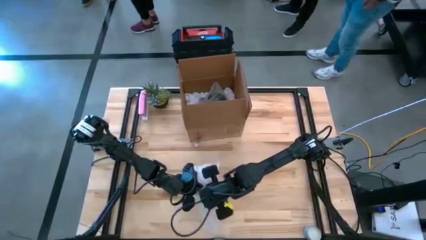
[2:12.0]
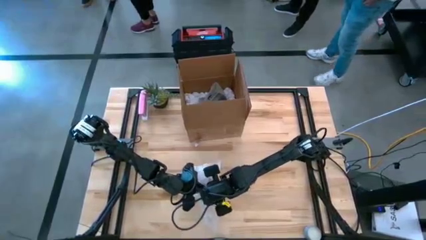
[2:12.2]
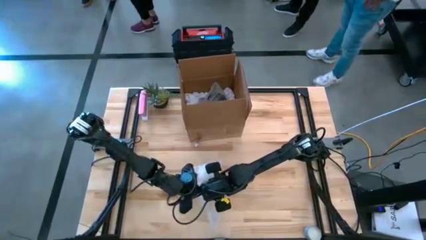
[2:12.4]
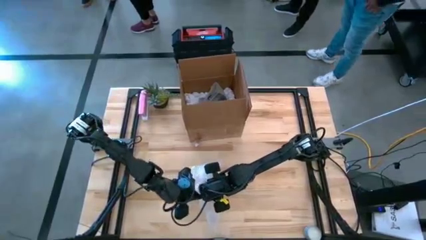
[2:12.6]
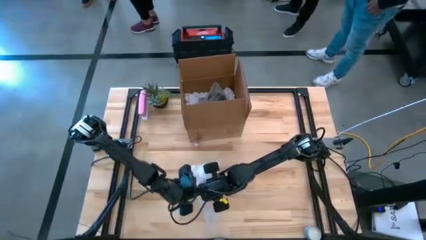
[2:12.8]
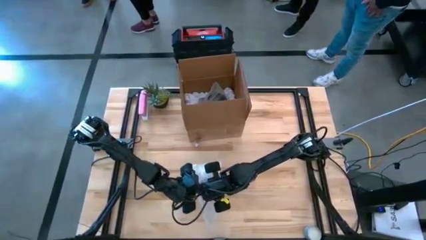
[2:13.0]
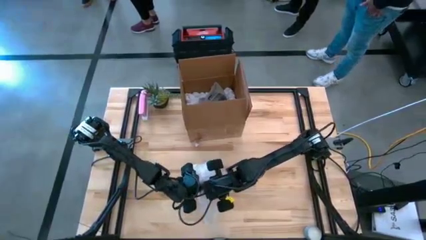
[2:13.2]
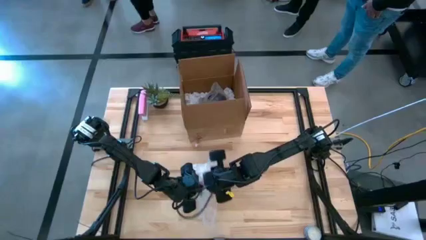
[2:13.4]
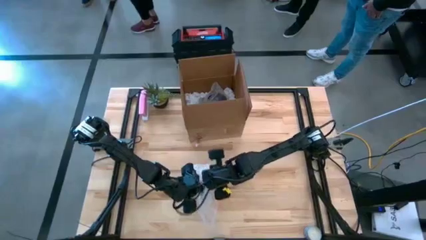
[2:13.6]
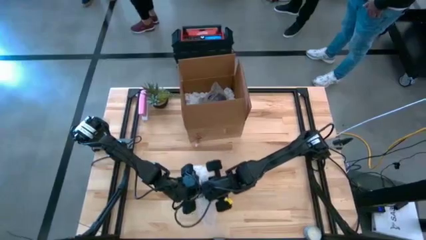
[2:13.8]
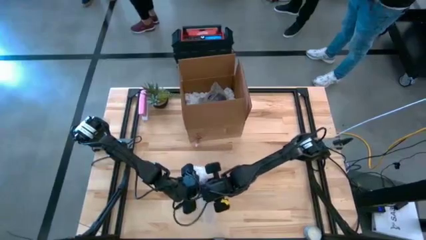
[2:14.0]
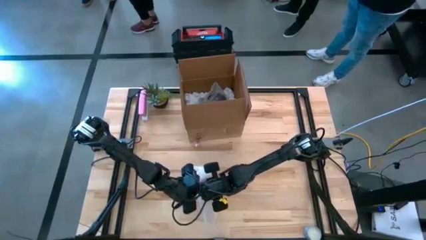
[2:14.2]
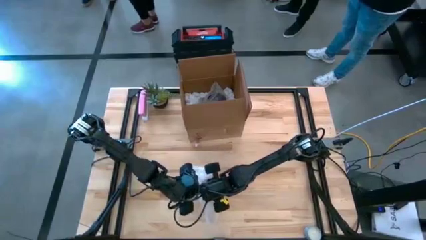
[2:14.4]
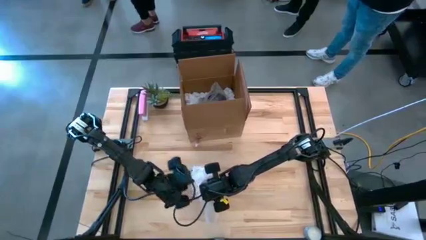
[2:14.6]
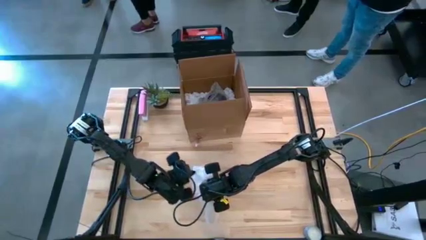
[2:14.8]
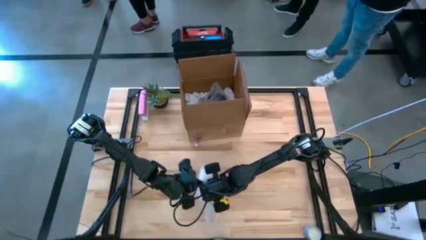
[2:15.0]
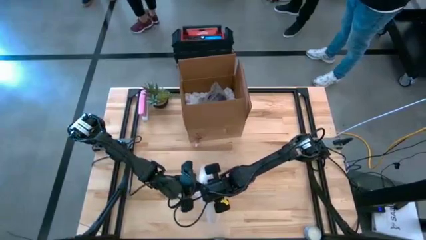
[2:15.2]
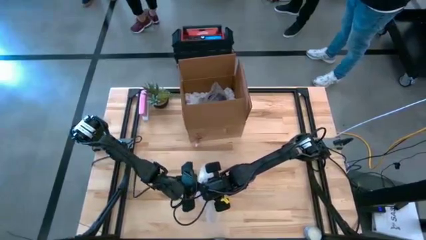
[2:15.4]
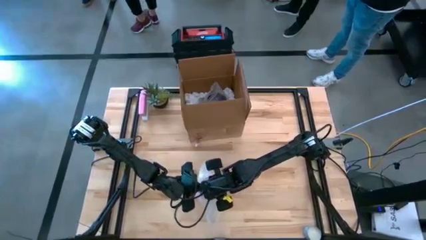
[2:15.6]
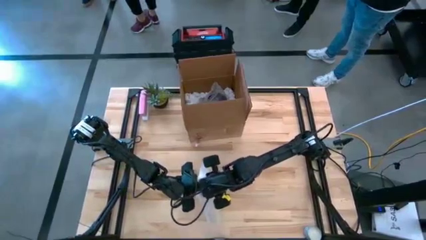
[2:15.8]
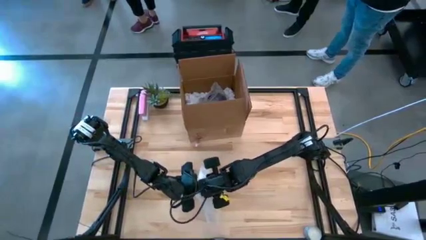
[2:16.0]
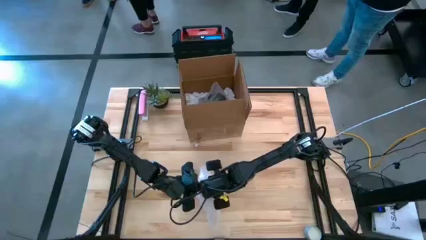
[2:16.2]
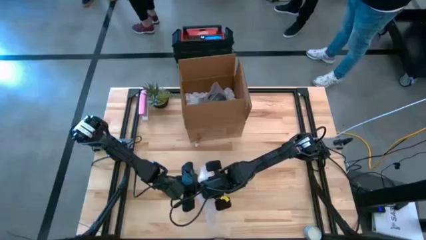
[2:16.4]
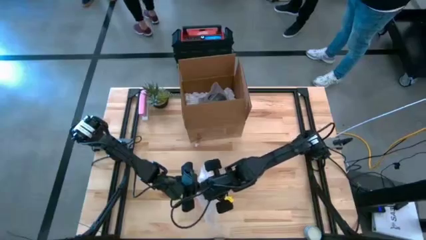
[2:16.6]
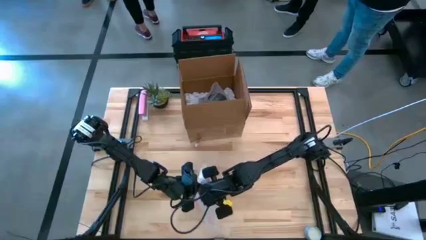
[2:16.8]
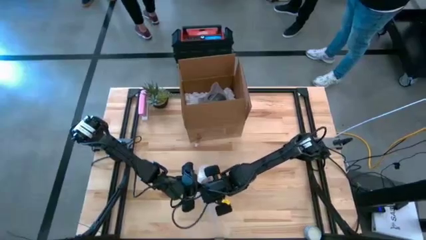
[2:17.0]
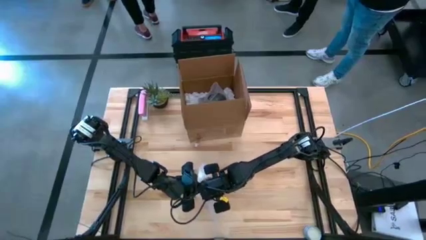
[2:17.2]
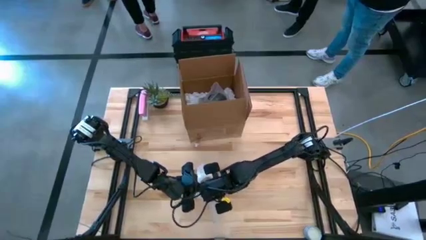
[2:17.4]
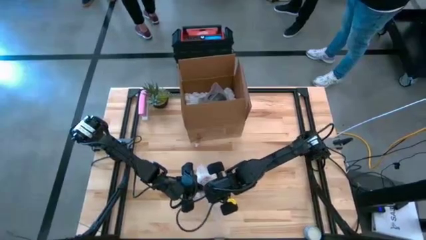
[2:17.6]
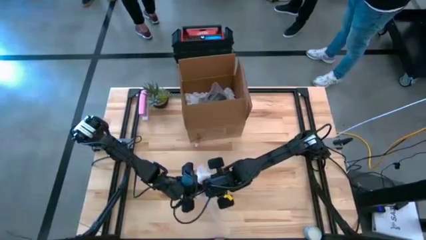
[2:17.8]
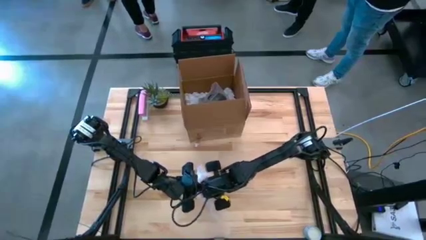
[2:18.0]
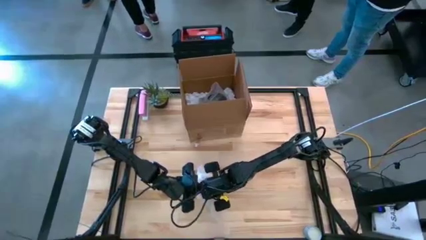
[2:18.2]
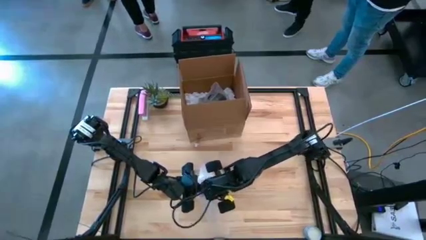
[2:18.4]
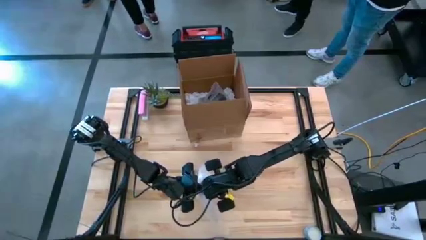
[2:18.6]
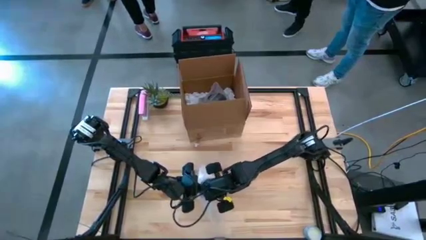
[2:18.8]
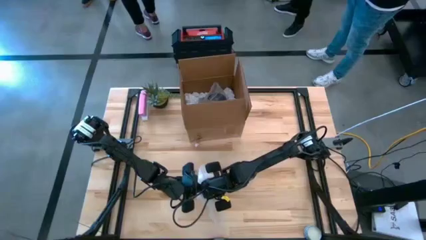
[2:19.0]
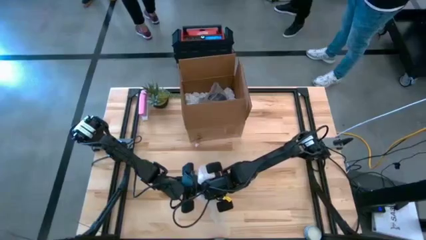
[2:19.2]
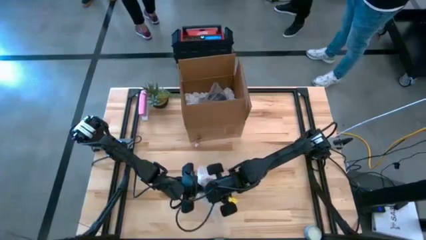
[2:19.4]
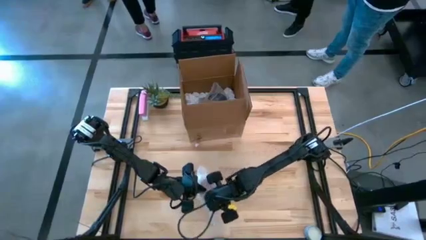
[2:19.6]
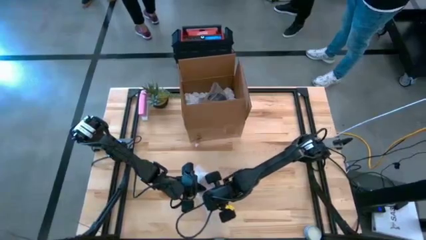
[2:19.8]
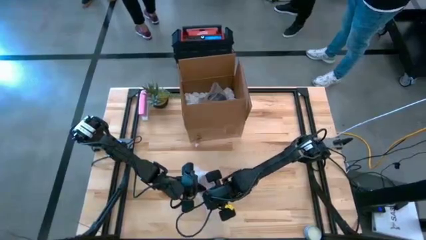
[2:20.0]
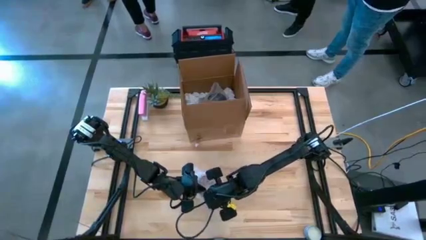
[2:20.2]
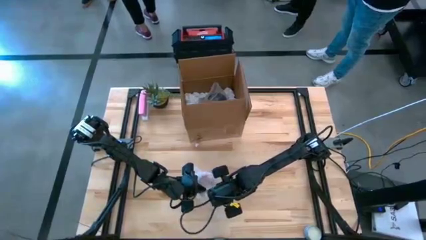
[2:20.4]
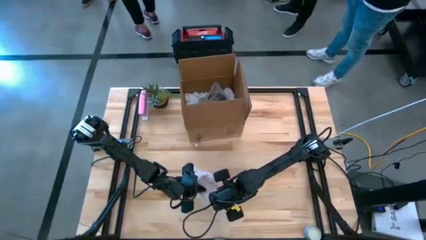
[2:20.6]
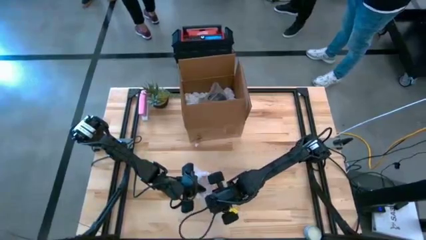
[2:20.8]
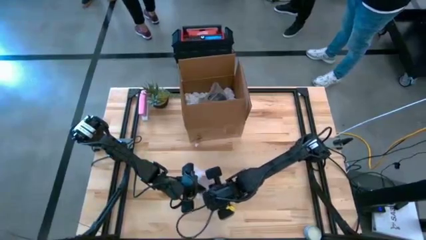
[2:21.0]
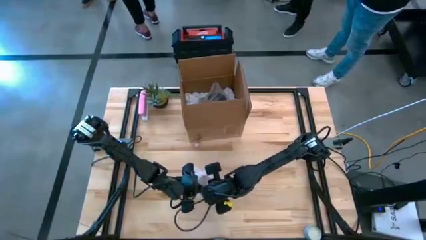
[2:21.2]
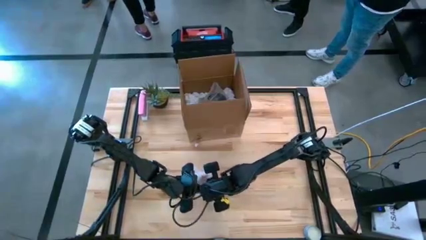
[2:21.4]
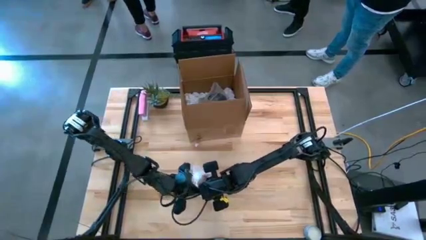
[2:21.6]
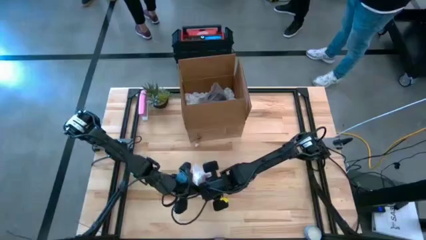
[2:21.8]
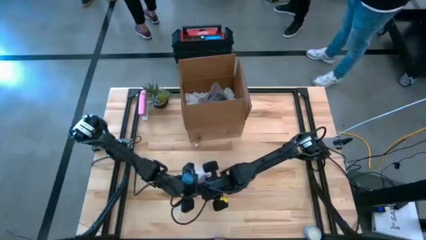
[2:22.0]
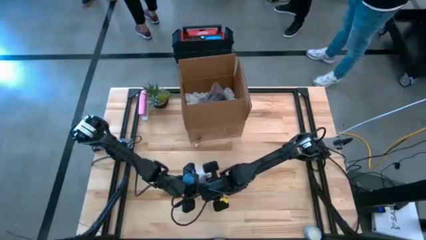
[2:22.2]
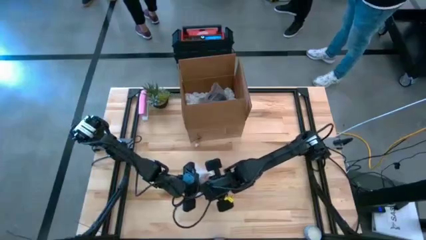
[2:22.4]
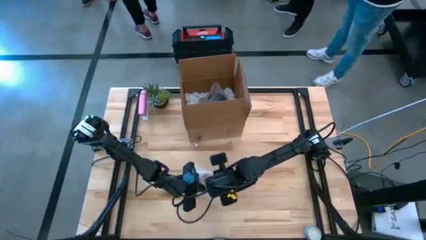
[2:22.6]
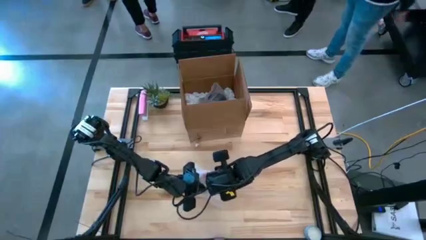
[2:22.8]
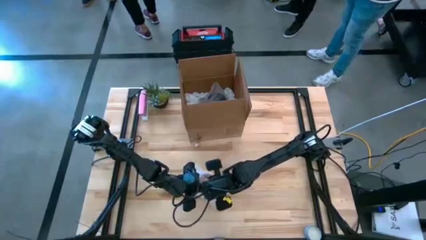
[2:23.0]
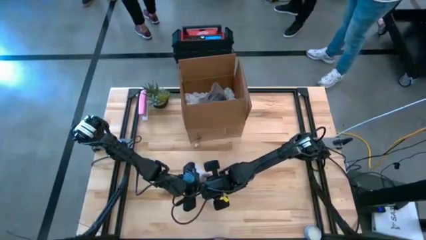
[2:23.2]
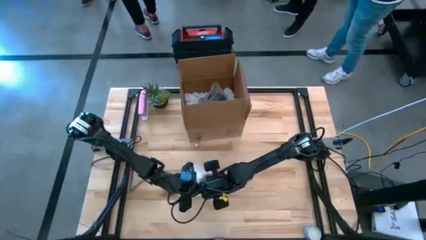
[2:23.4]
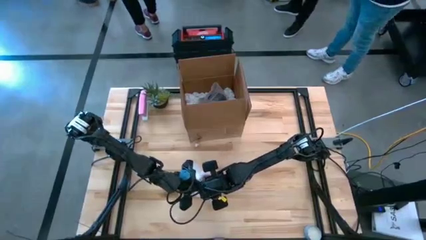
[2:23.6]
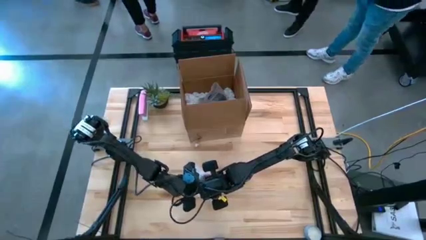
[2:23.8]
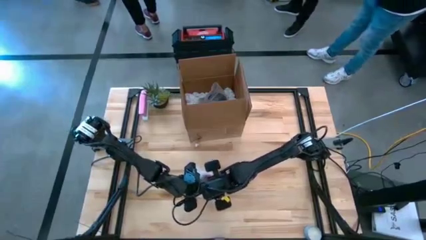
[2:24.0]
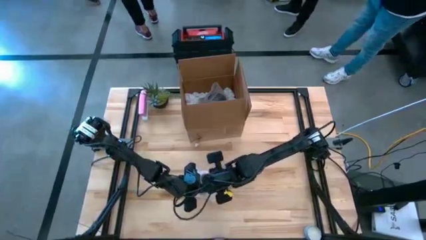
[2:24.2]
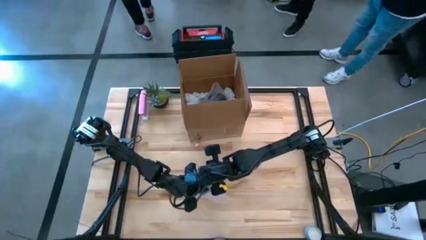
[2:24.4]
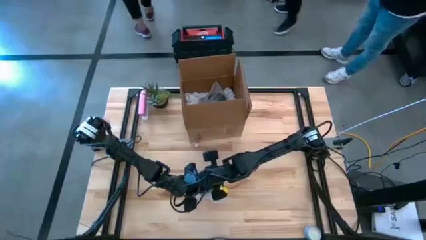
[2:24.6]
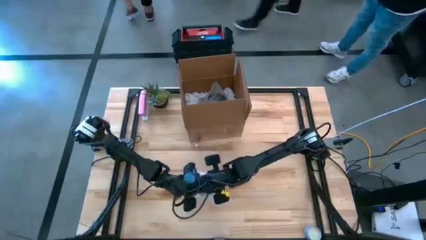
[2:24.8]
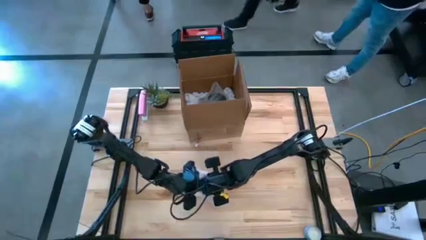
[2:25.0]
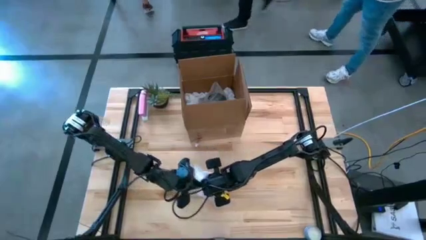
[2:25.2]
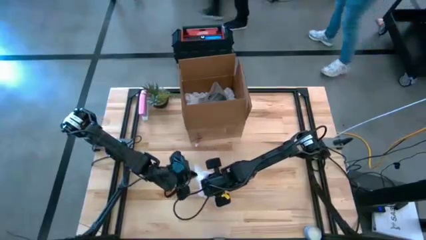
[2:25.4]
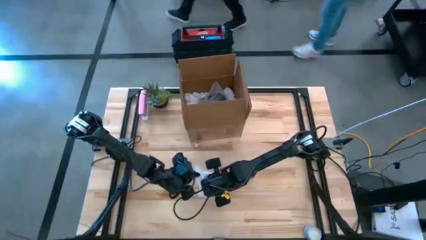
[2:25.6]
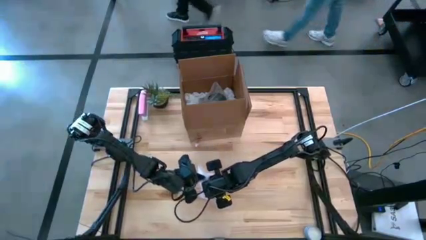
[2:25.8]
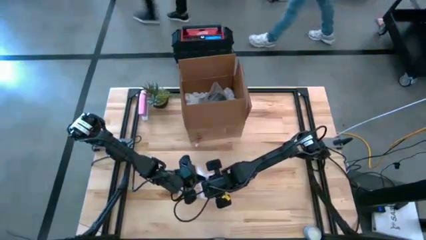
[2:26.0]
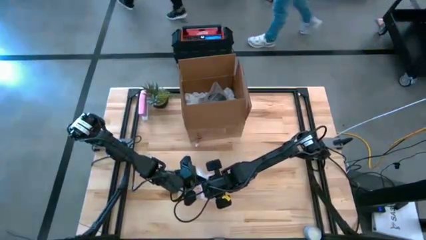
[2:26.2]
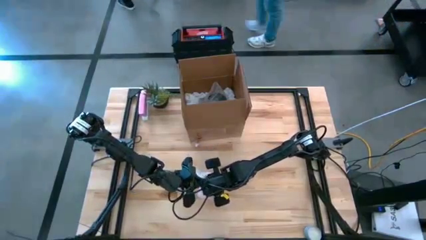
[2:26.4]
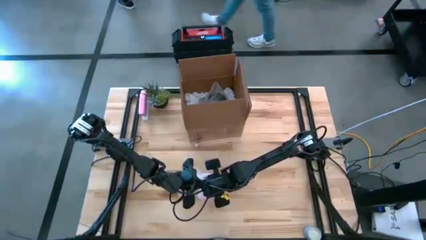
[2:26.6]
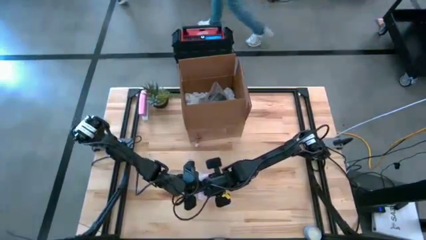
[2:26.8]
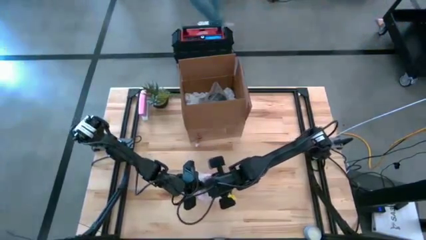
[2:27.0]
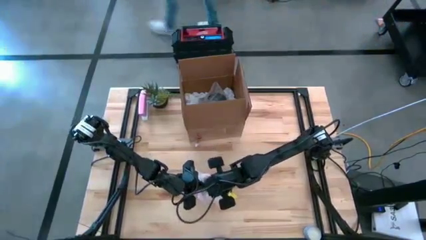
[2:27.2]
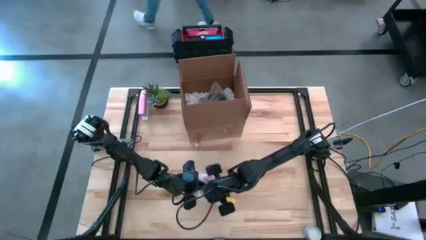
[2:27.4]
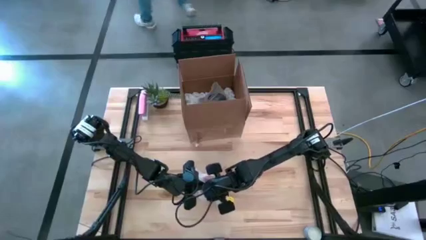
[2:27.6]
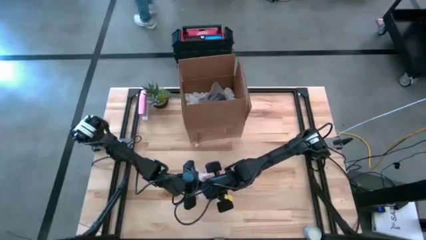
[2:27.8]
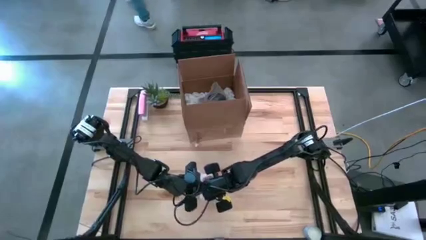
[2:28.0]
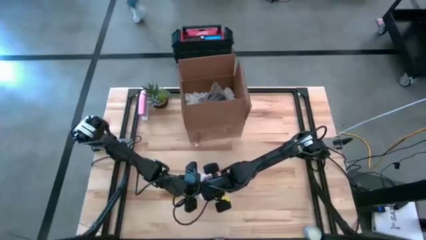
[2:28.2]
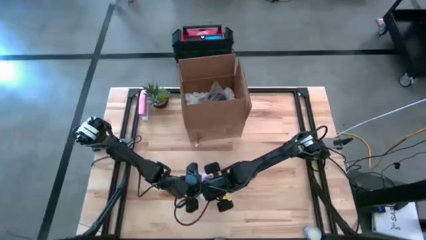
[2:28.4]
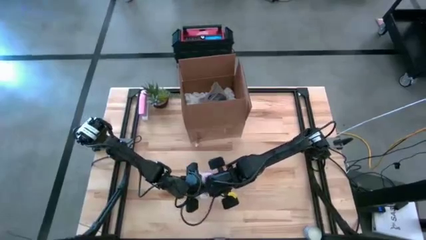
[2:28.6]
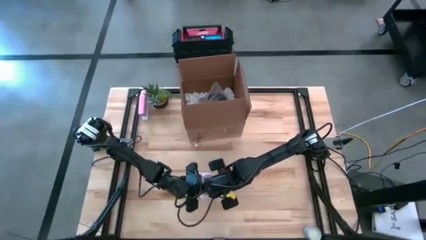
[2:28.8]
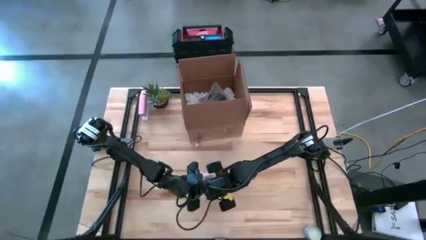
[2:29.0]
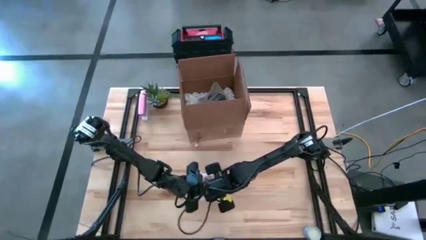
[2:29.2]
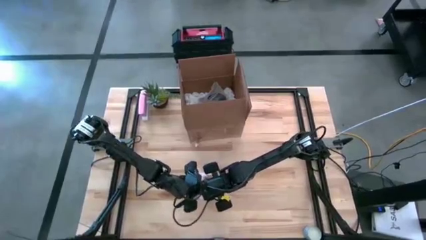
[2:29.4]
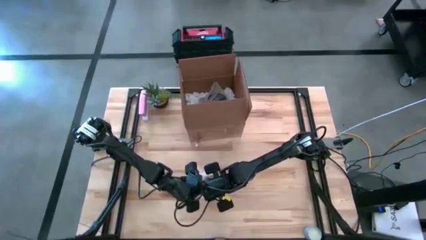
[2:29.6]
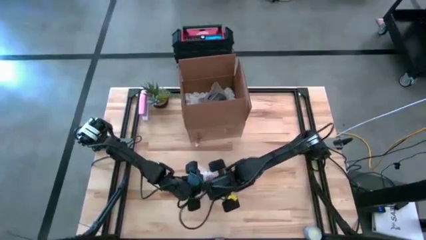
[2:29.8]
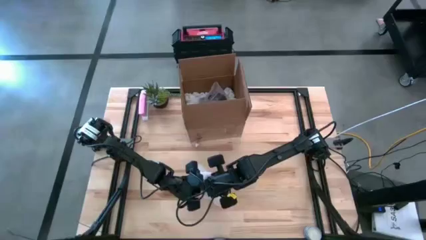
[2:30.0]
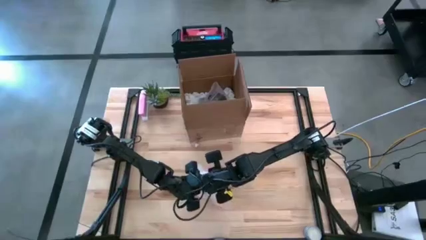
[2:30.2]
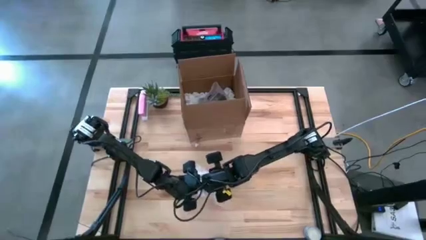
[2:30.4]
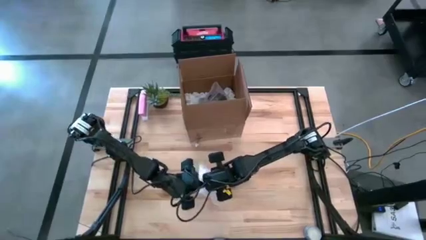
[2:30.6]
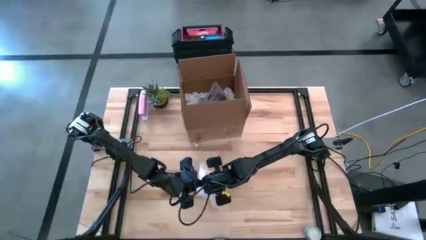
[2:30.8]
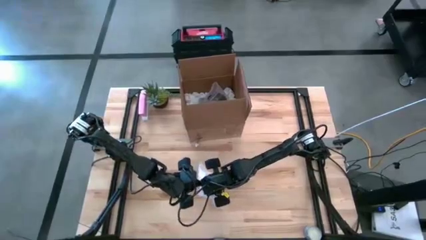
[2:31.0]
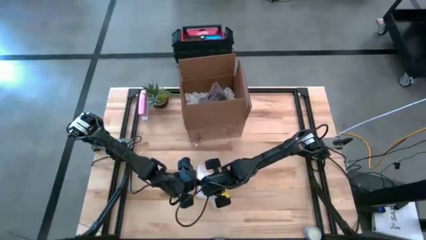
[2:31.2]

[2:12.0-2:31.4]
Task: wrap mug
Wrap the orange mug with transparent bubble wrap
